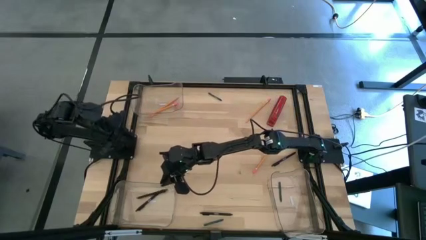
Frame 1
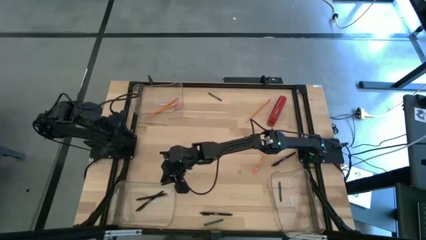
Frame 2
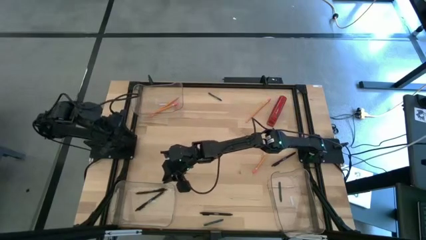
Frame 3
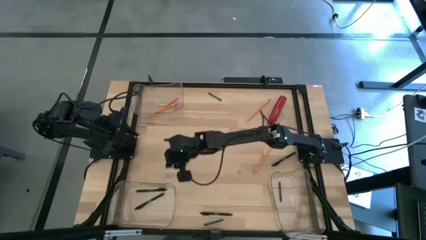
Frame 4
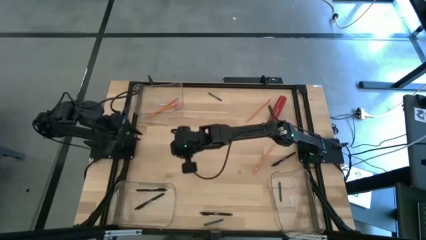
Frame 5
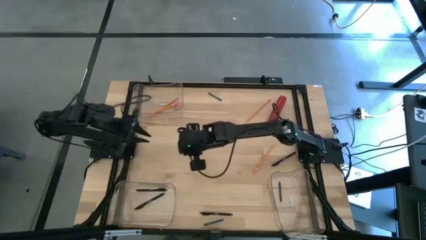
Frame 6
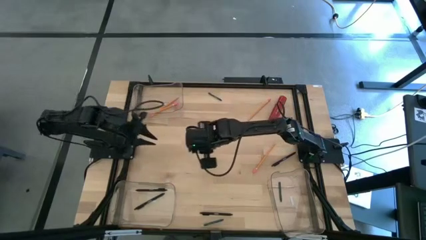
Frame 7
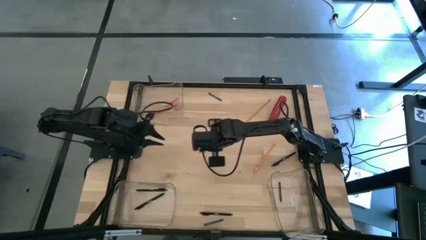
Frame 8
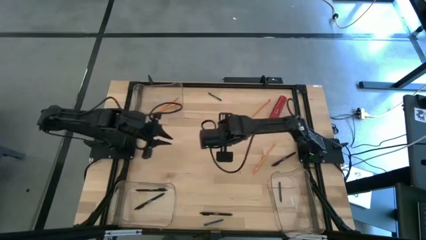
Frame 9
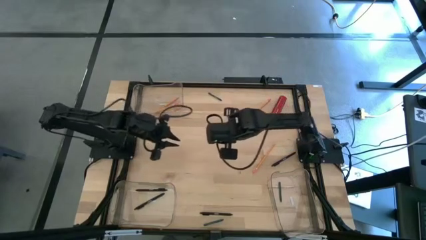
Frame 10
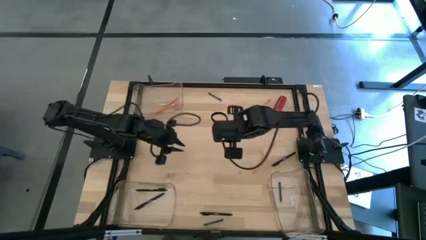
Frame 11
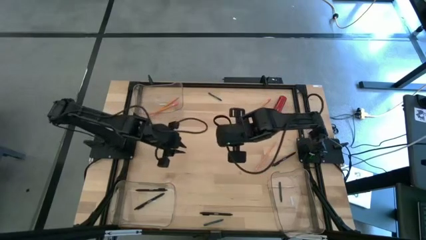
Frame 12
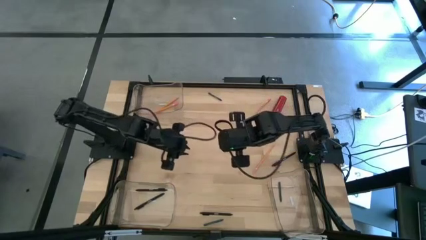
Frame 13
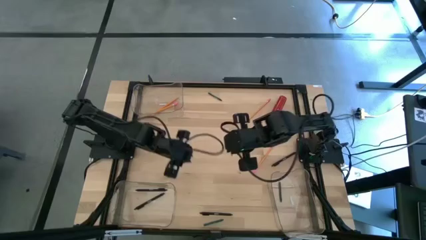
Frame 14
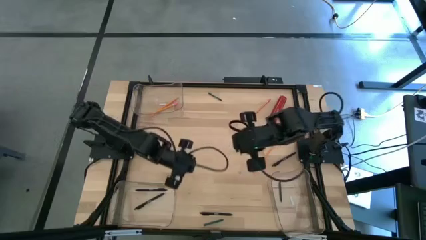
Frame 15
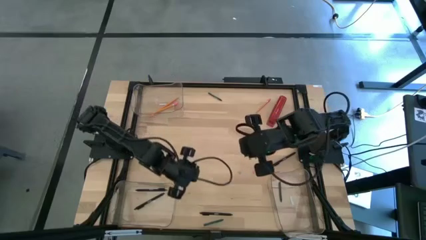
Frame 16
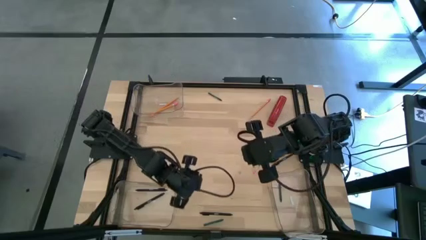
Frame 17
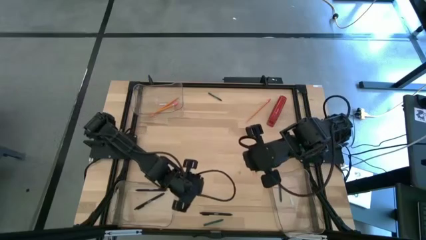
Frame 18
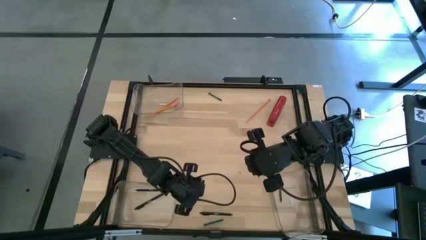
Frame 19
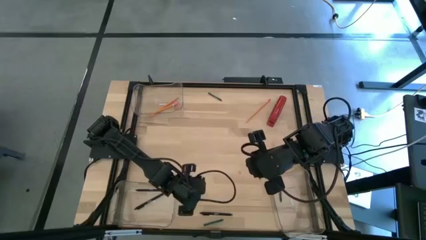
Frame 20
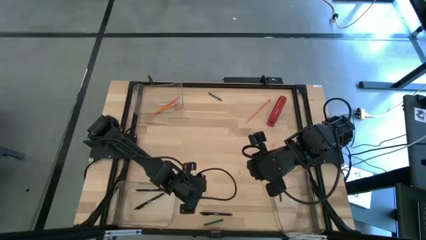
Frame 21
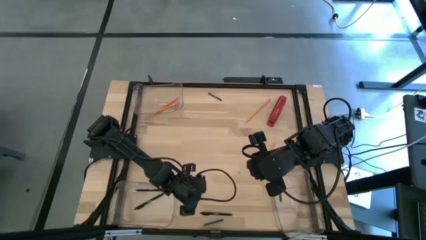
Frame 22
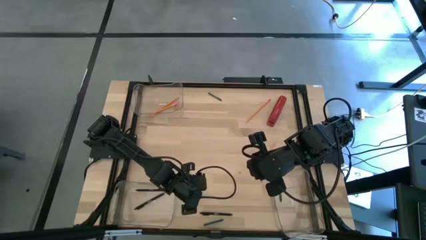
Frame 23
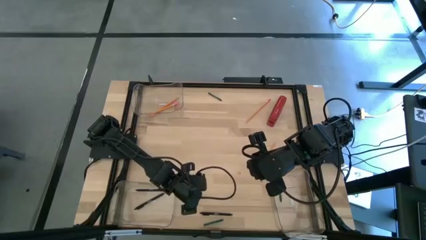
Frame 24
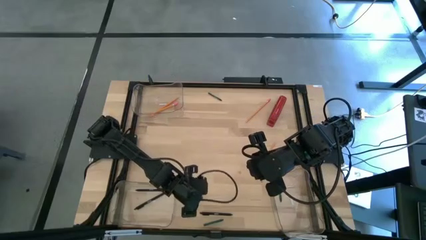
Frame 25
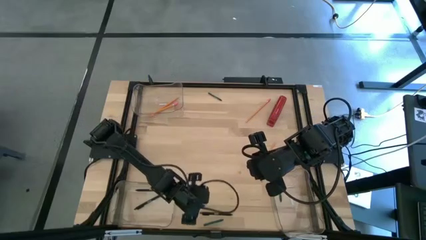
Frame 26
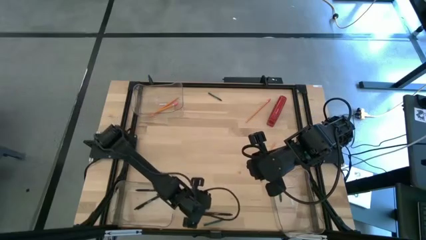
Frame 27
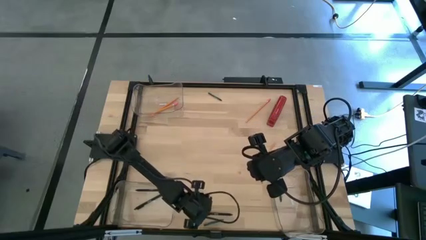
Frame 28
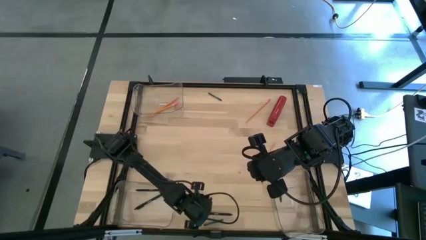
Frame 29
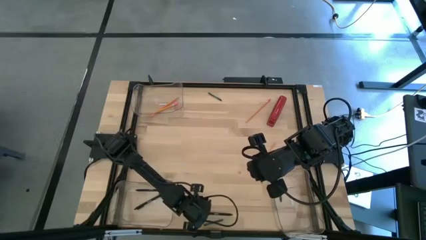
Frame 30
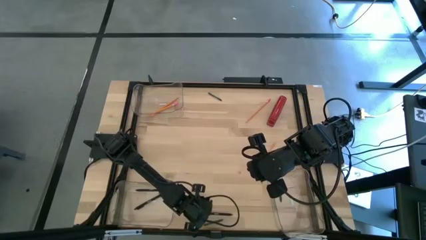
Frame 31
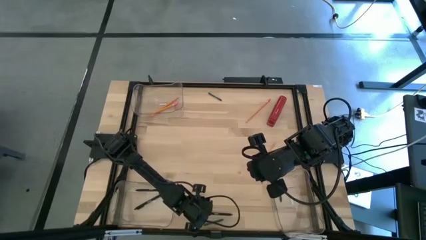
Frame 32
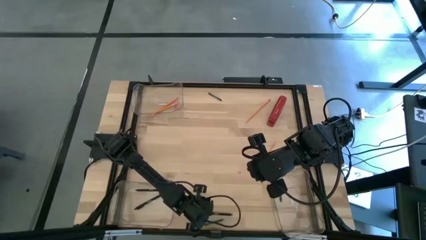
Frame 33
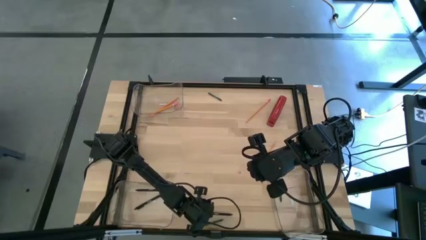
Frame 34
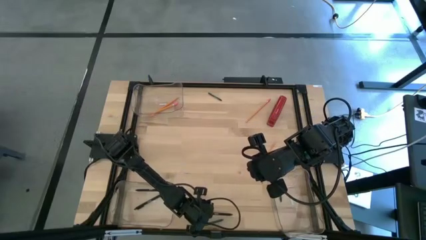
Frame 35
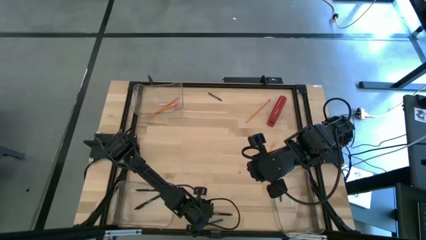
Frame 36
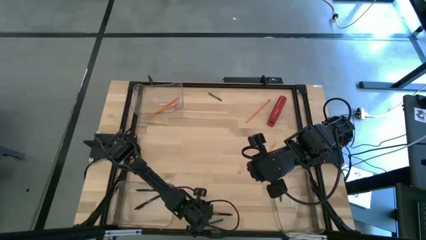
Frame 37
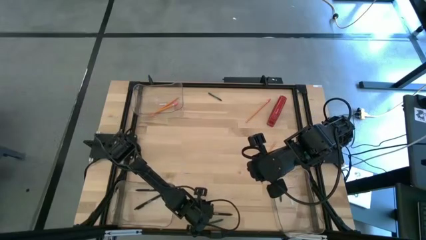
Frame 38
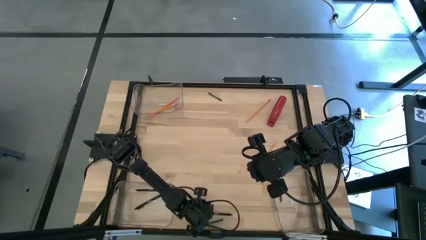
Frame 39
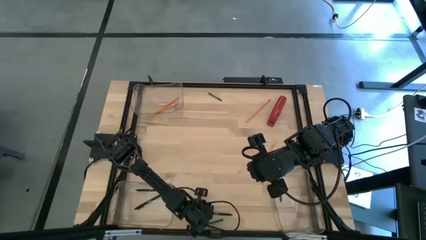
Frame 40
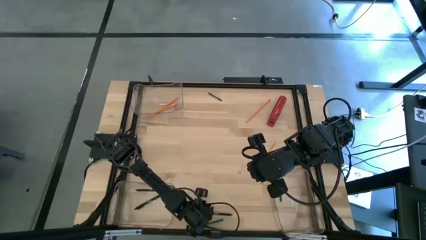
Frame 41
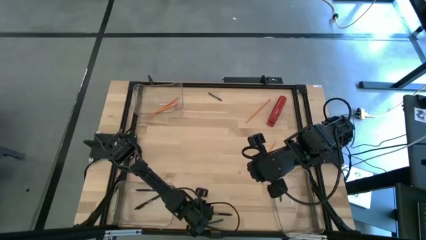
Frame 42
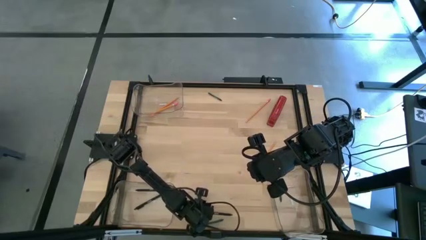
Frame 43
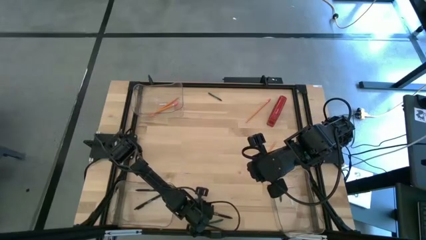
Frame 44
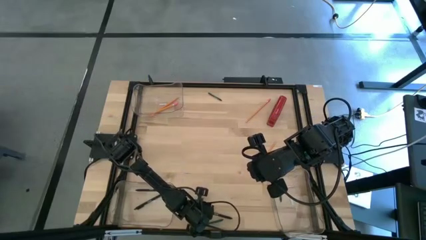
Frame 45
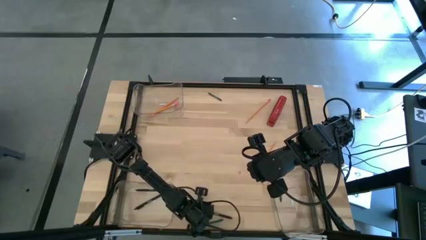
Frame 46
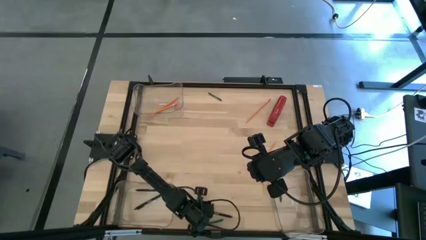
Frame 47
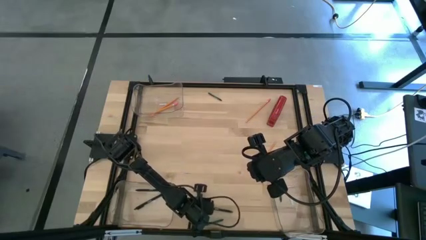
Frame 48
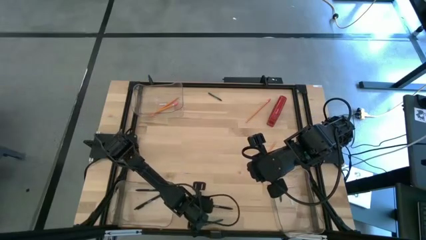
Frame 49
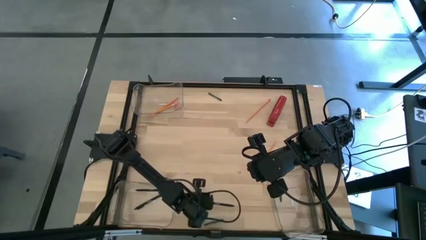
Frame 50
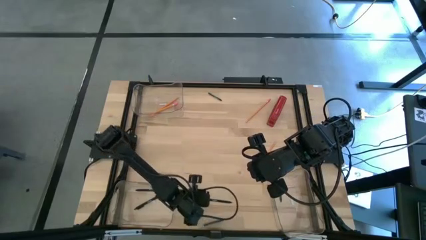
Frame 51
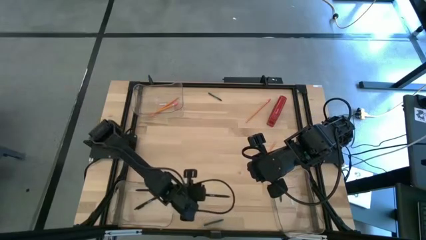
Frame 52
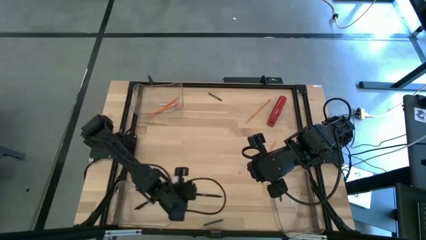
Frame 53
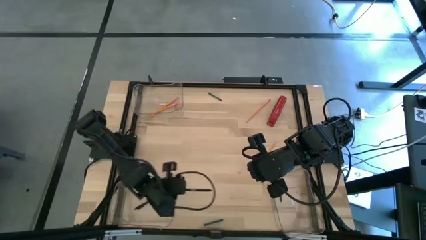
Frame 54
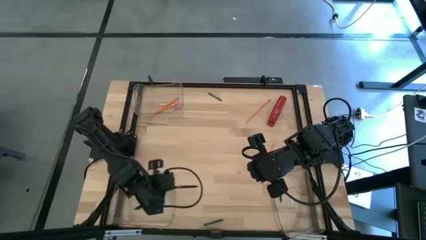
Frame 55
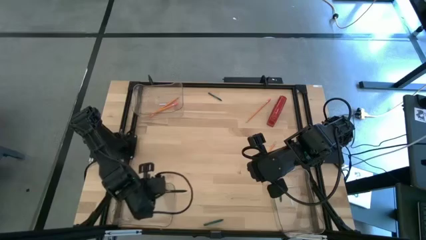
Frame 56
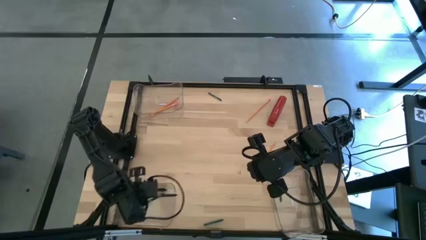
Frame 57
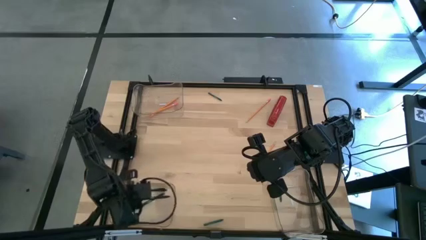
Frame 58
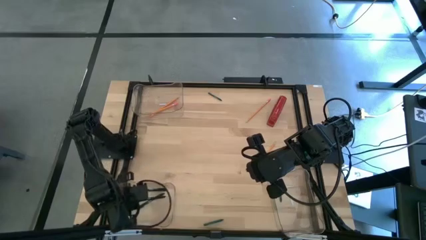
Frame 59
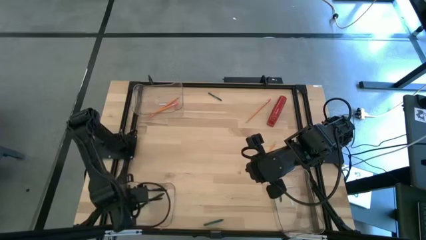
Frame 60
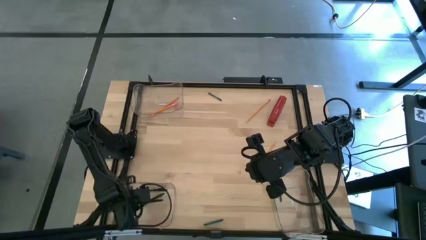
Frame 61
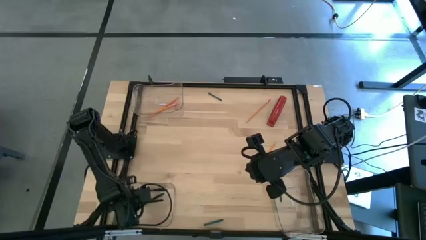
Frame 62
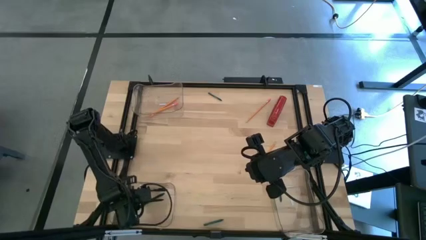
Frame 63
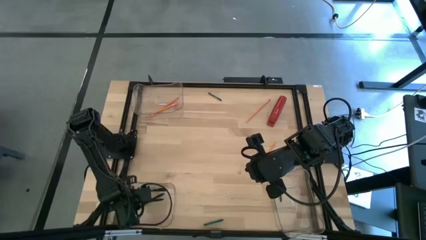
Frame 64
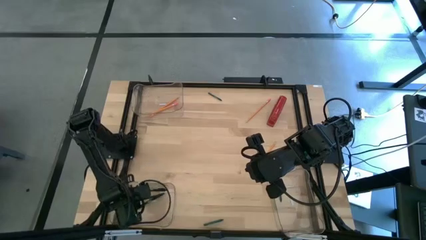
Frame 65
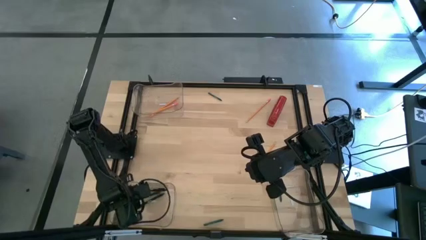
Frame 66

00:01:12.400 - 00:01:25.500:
Task: Sort crayons/erasers/pens/pencils in bins
Put the black pen into the bottom left transparent bin

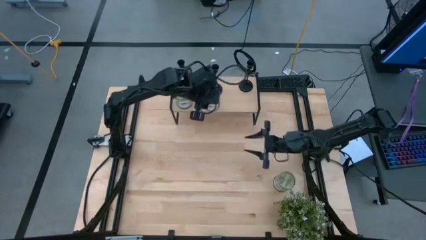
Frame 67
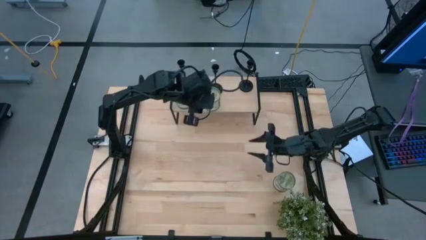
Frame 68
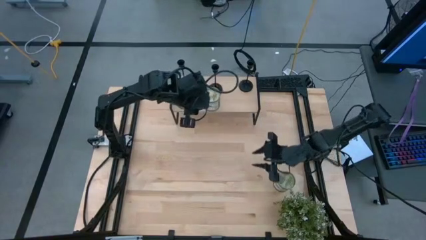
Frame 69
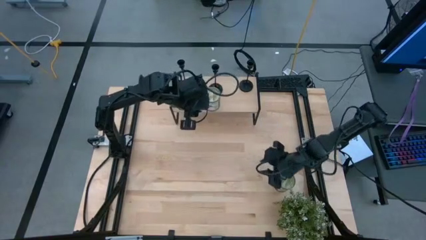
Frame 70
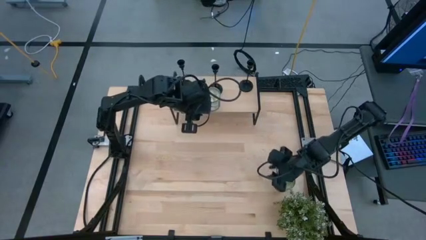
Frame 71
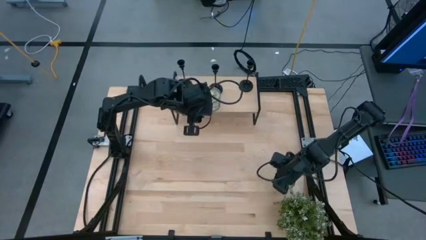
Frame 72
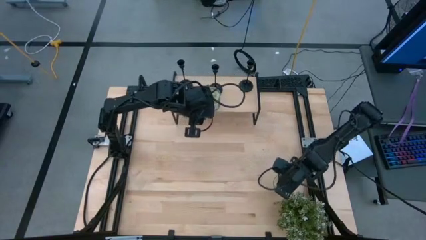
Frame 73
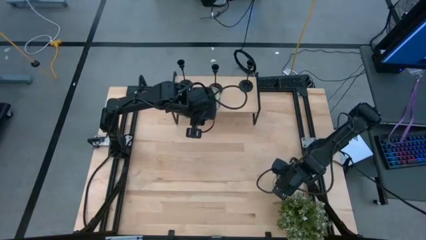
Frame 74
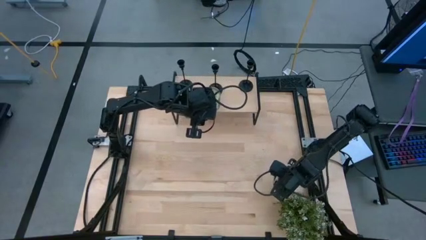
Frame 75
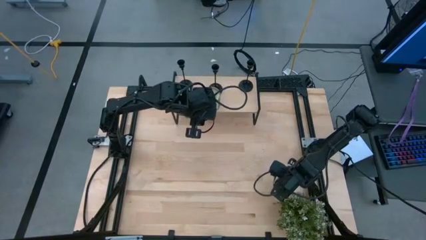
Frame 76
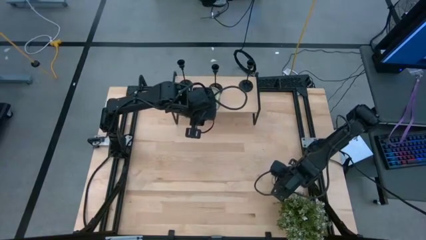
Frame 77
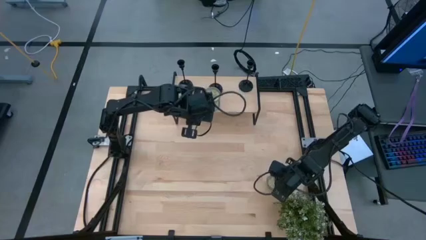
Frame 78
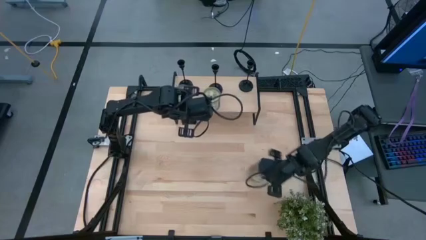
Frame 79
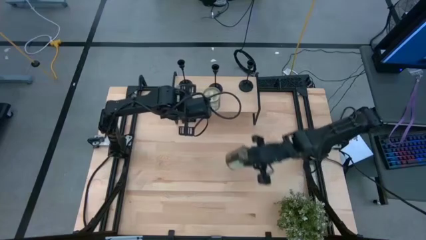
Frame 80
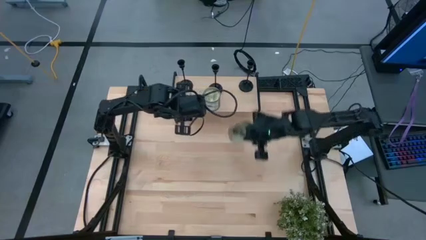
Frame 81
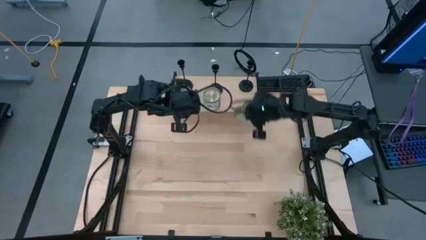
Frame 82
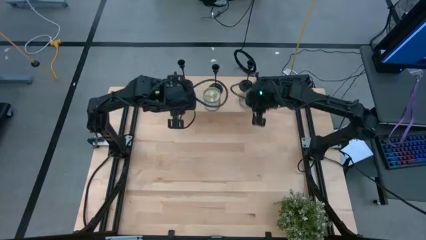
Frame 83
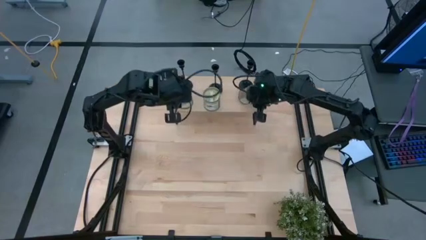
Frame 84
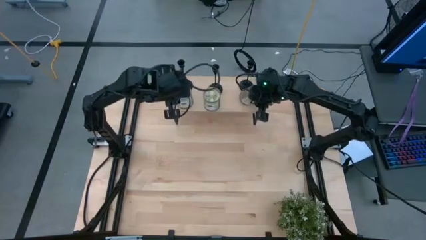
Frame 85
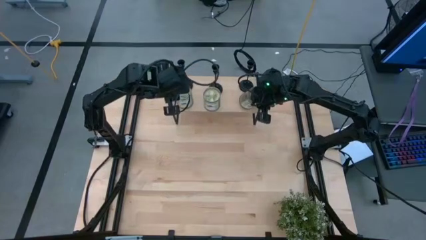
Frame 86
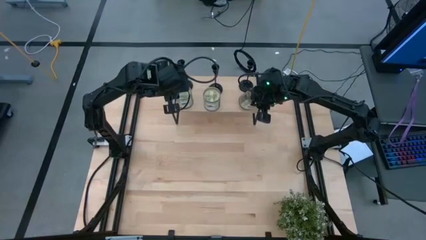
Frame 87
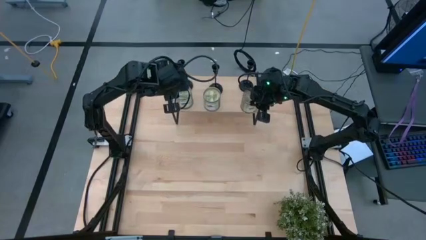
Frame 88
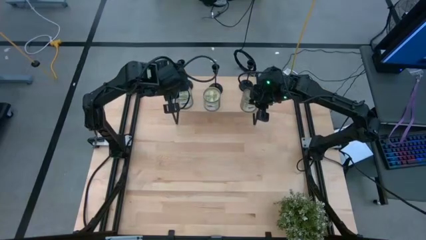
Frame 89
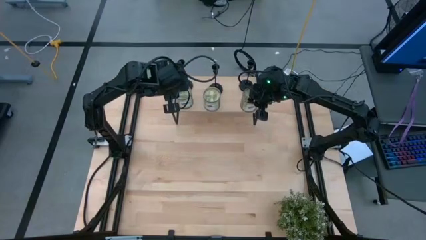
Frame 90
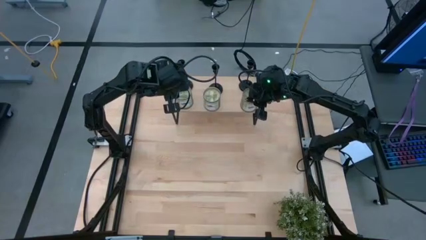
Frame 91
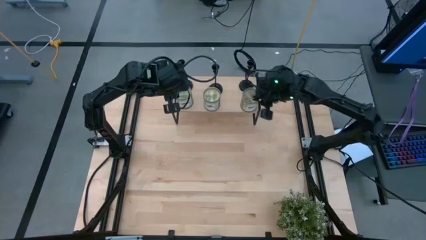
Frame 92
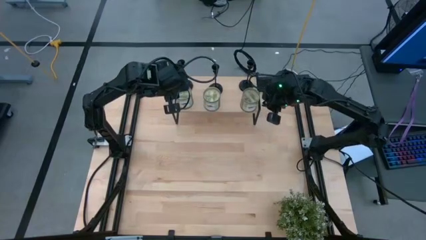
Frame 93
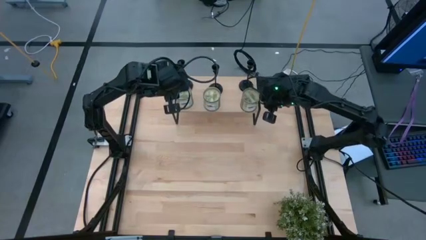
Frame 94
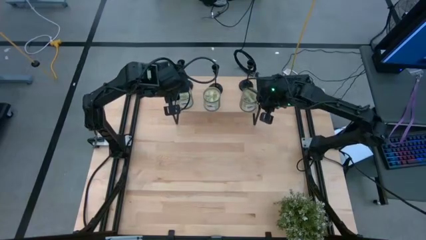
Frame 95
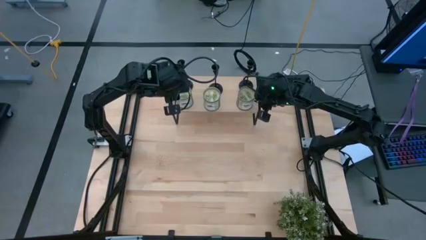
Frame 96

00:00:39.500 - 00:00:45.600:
Task: Pick & Place candle stick holders
Put the left green scented candle on the shelf aligned with the other green scented candles
